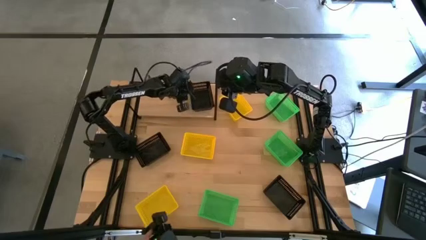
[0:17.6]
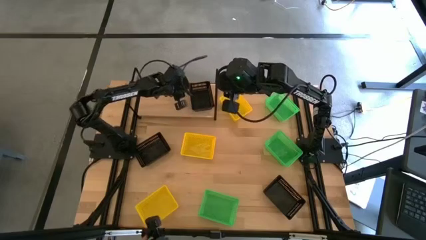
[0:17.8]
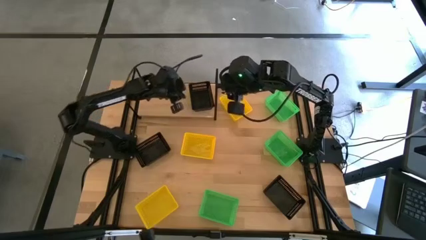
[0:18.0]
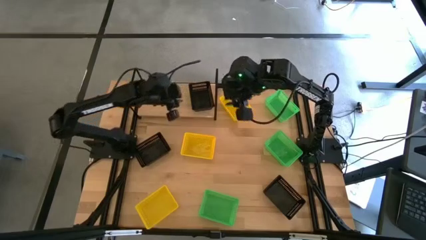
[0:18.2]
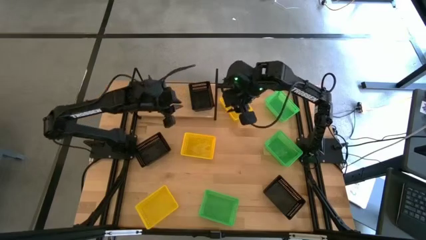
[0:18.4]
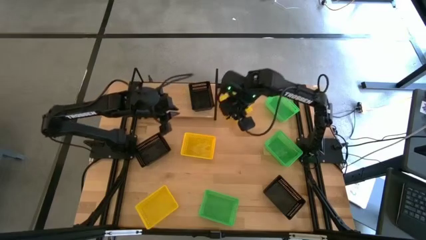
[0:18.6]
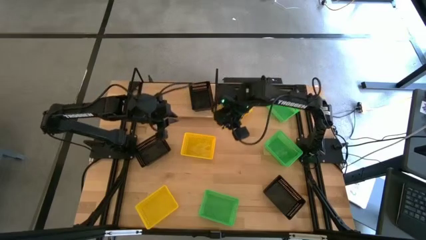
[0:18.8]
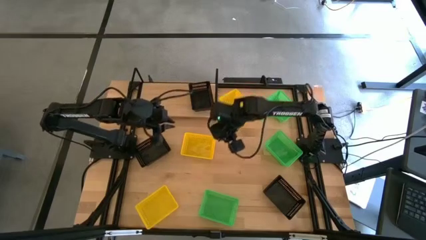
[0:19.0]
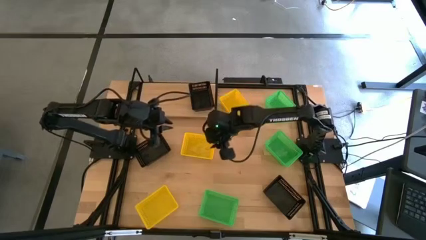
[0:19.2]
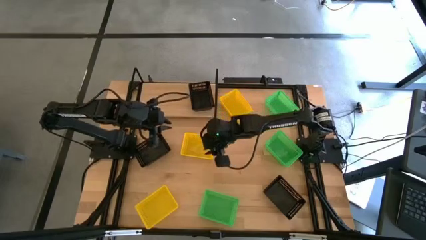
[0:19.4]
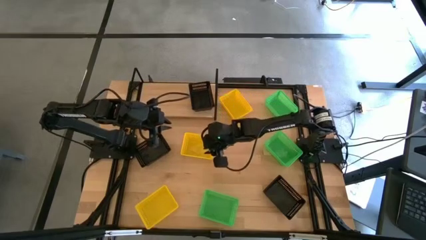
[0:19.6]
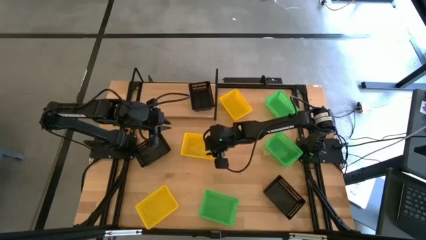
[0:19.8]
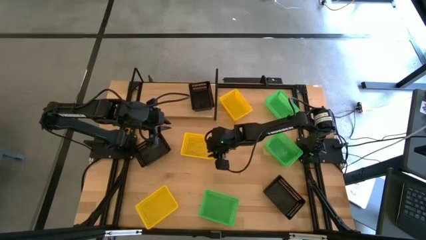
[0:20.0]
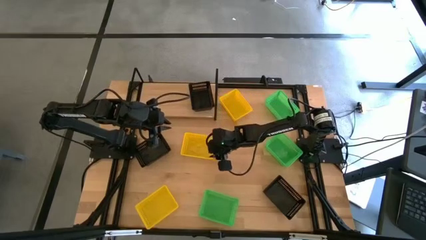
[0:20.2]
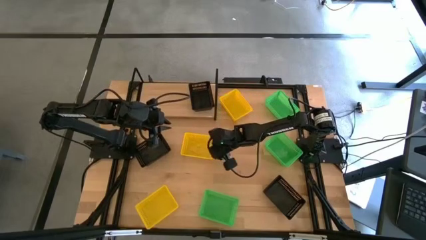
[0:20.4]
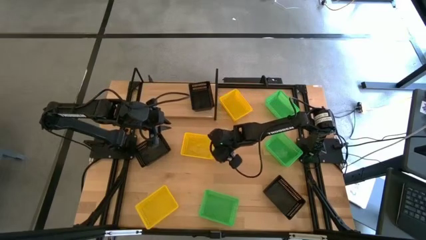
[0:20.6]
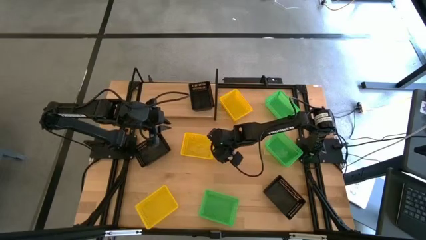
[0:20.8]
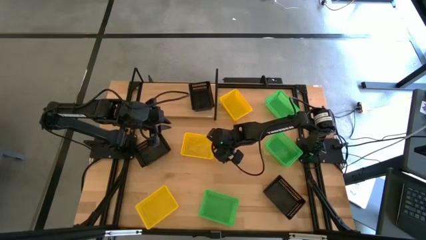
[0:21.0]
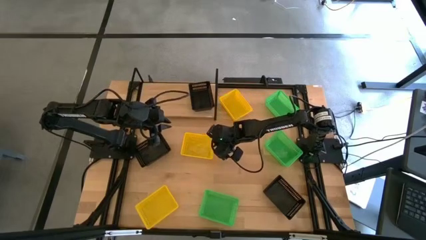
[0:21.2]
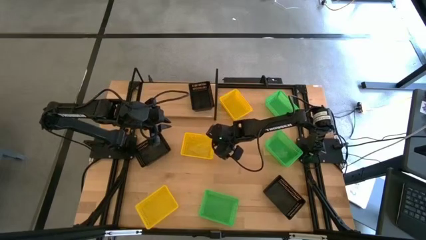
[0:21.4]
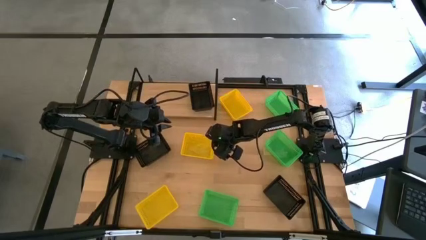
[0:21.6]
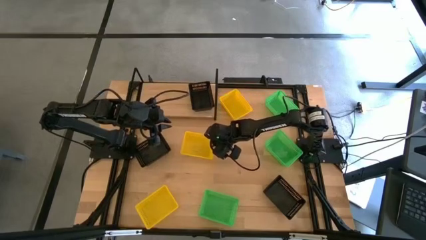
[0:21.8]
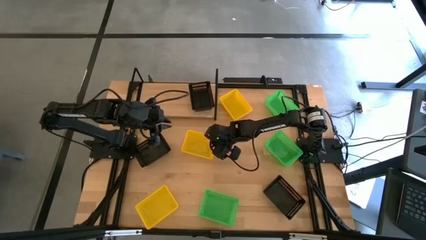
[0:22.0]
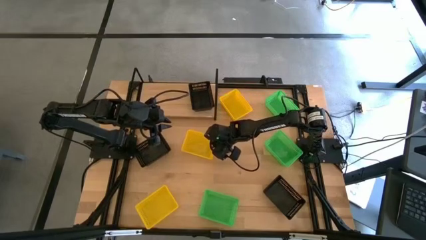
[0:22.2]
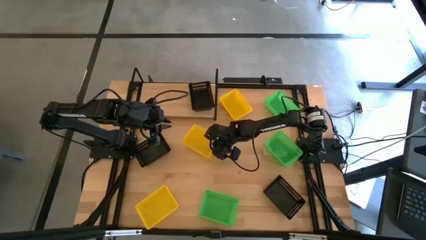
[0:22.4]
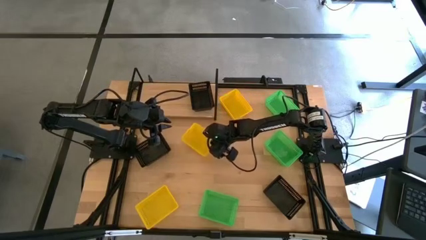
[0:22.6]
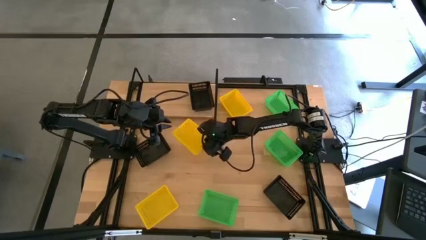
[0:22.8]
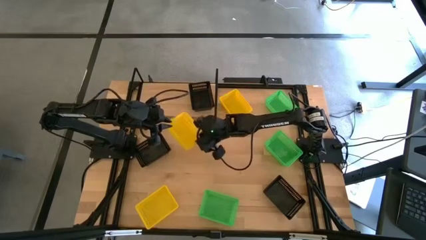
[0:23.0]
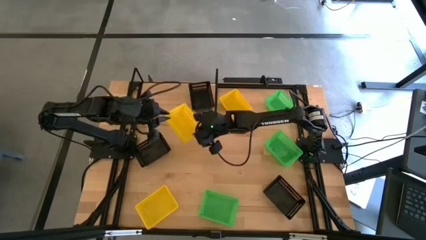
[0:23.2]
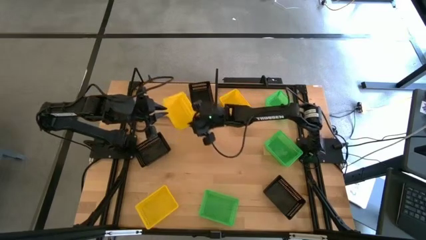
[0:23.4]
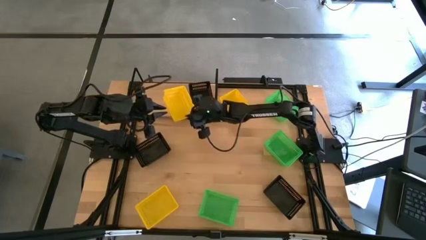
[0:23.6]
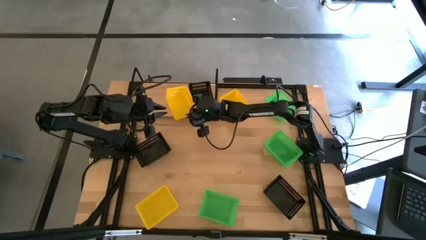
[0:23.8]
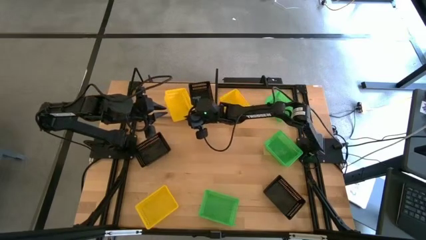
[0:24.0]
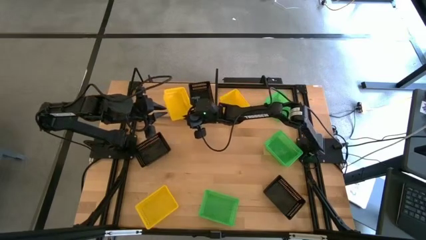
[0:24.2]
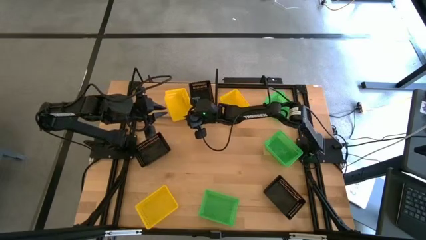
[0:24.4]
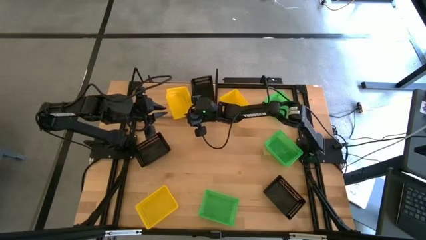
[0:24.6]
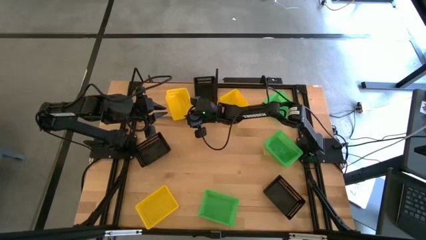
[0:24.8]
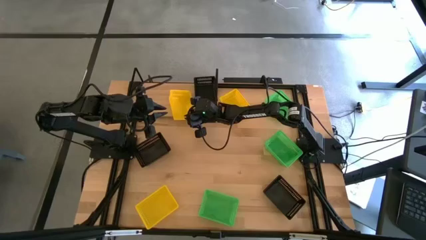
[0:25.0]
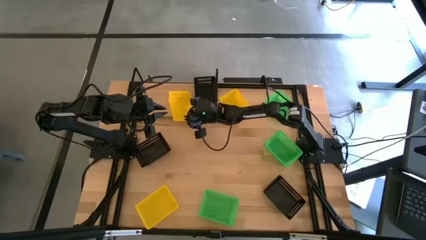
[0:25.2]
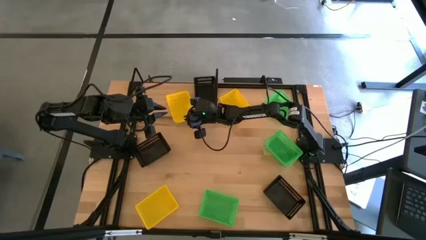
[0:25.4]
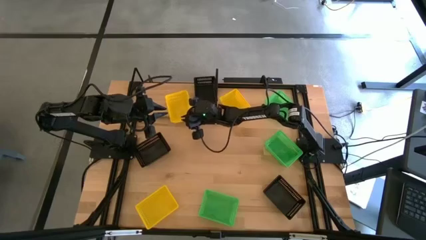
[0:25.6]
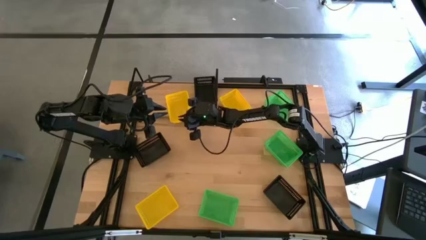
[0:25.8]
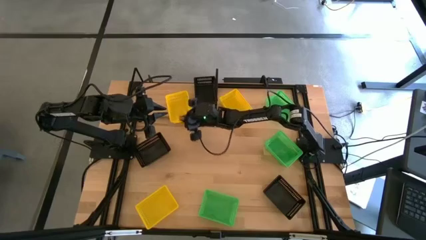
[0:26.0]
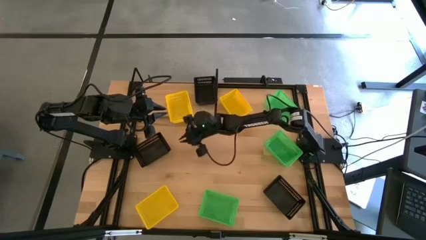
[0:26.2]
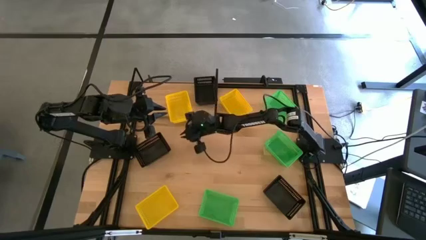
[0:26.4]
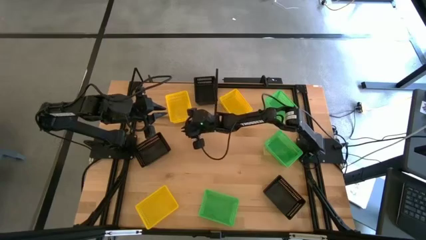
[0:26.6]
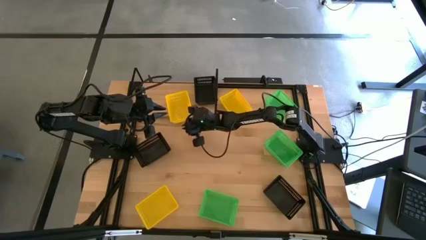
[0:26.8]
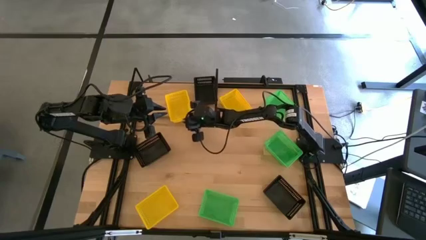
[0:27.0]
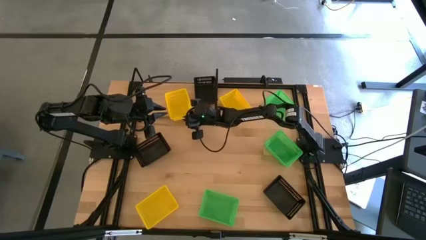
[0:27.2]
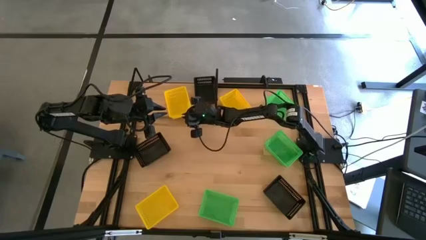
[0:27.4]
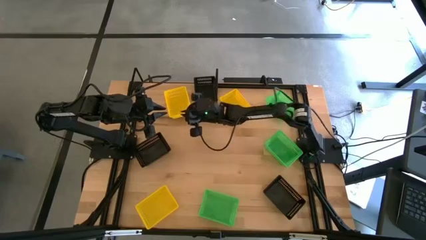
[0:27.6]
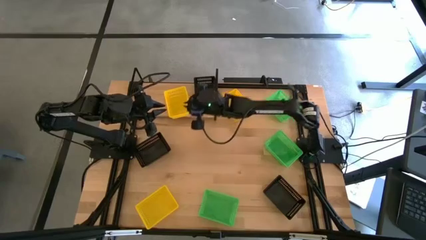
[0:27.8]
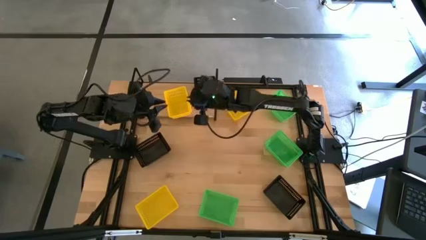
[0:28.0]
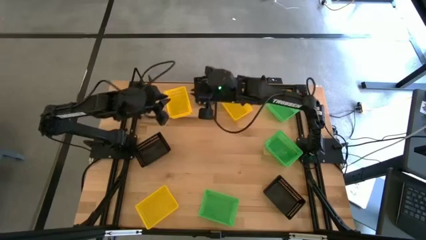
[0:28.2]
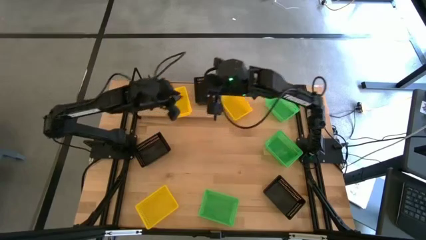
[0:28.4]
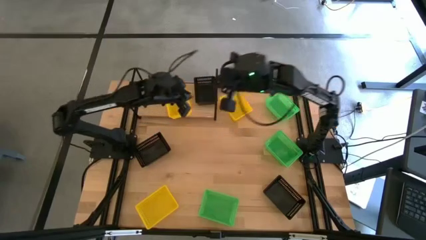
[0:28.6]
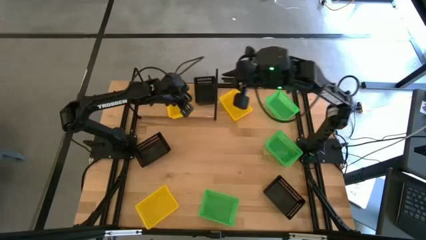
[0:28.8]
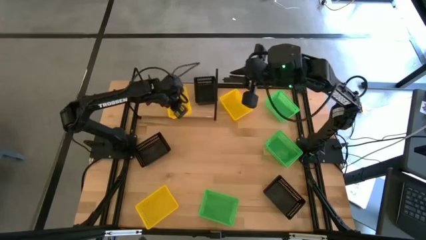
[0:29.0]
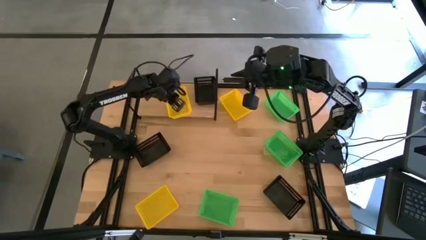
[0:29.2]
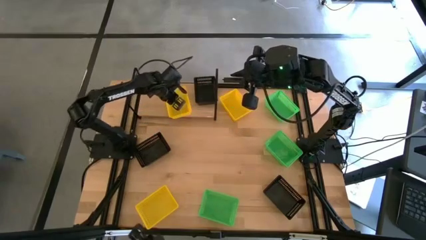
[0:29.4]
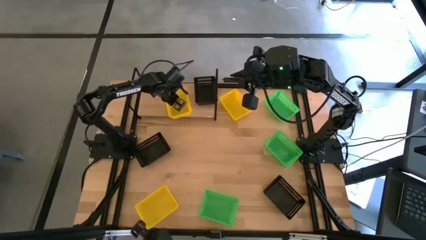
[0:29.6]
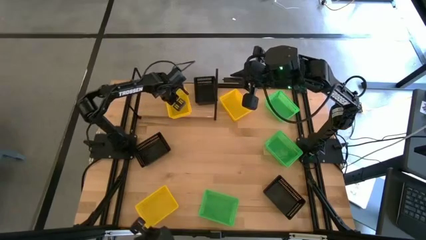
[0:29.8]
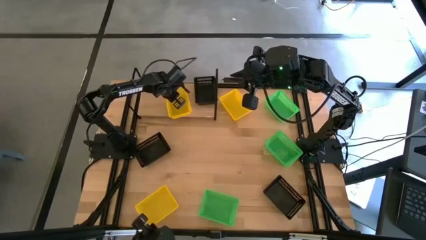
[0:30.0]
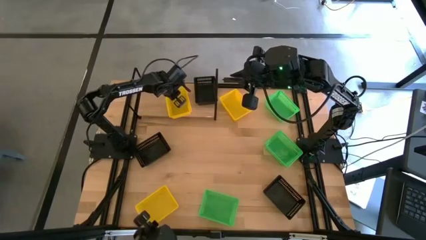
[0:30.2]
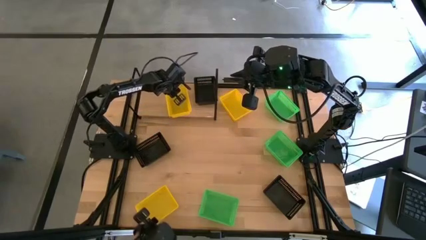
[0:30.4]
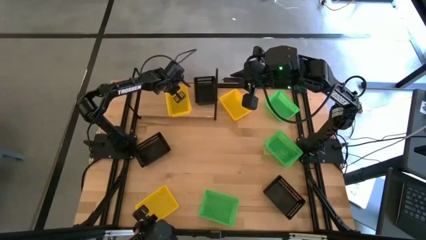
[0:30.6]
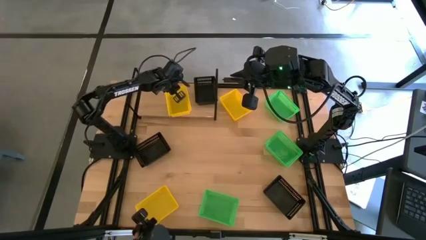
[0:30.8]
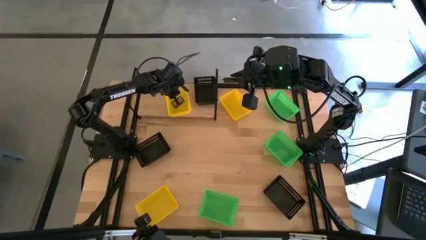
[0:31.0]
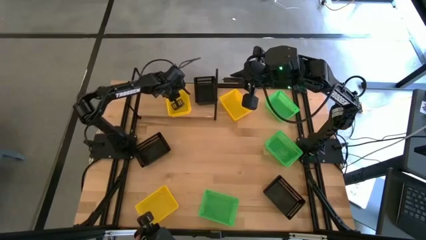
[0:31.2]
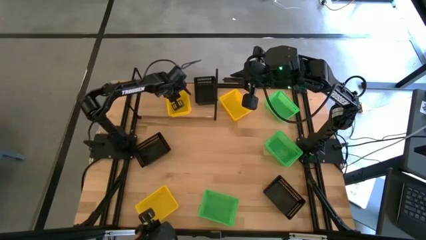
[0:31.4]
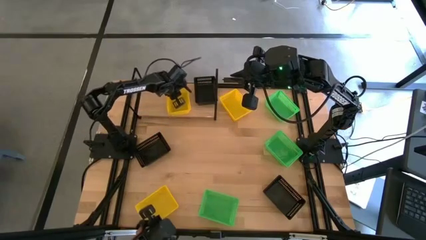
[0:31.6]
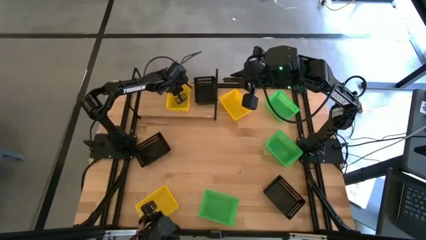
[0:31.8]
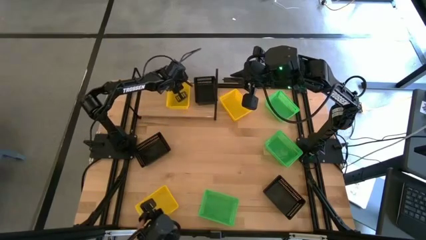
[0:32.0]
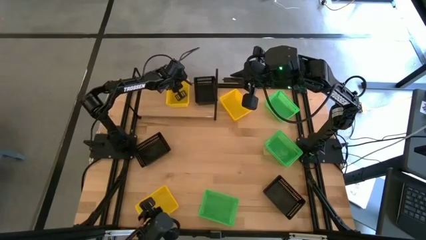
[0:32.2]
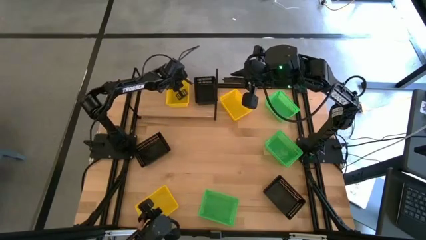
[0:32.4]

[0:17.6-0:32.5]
Task: Stack baskets on shelf by color
Put the middle yellow basket on the shelf
